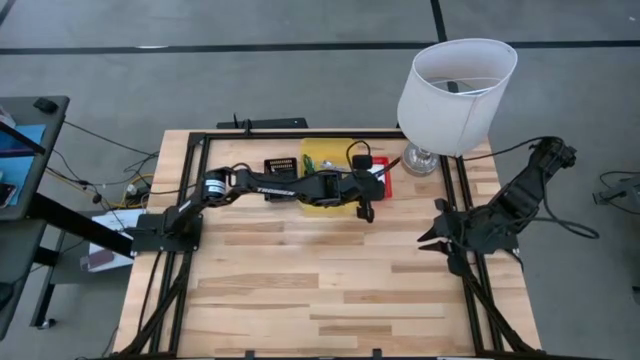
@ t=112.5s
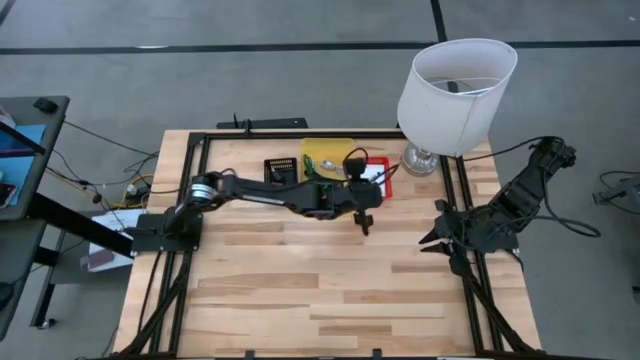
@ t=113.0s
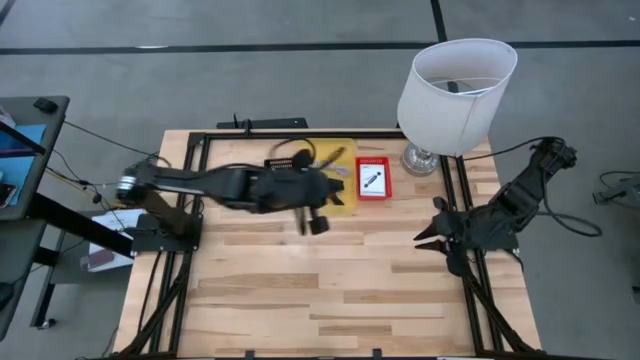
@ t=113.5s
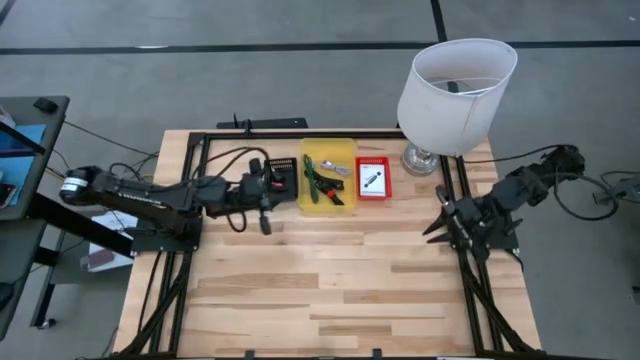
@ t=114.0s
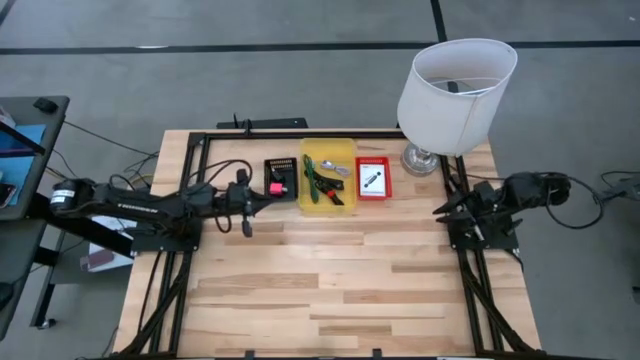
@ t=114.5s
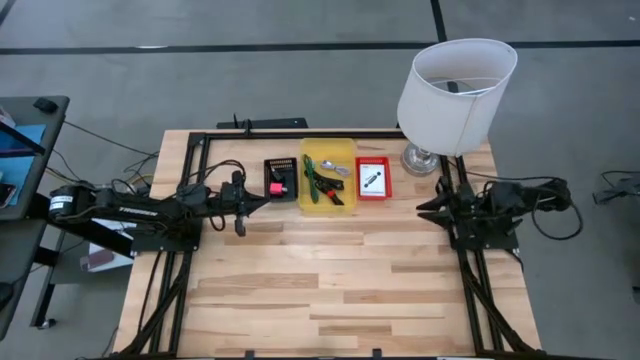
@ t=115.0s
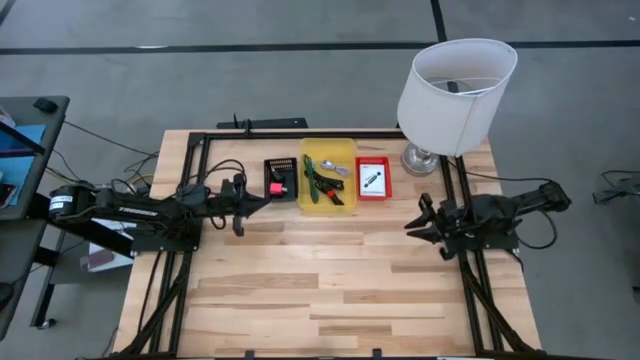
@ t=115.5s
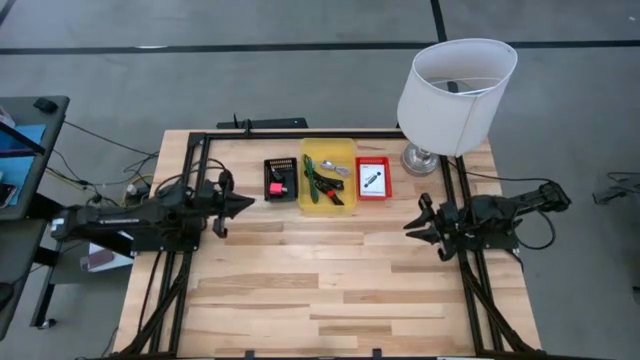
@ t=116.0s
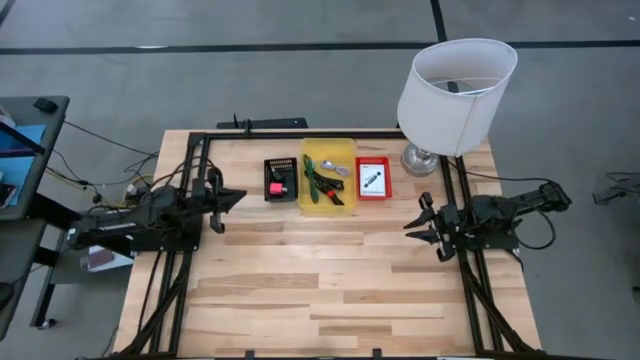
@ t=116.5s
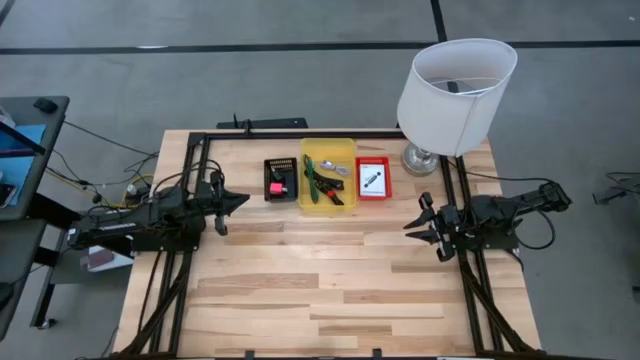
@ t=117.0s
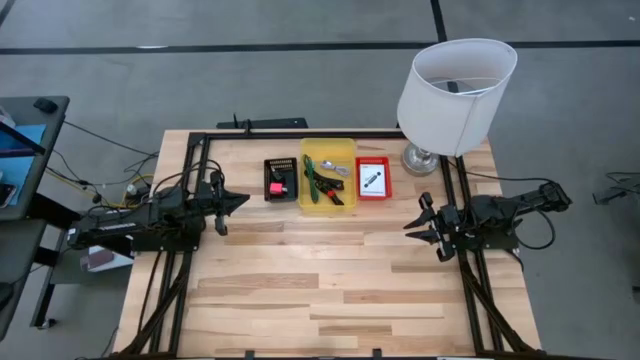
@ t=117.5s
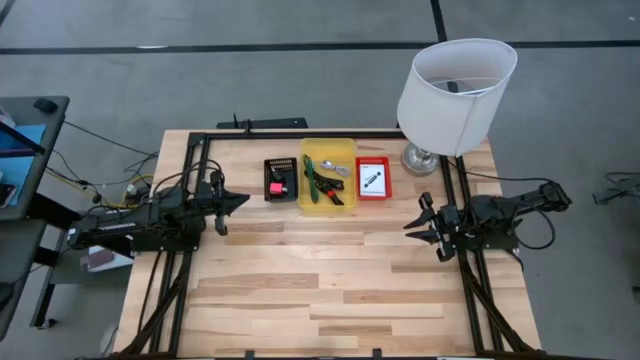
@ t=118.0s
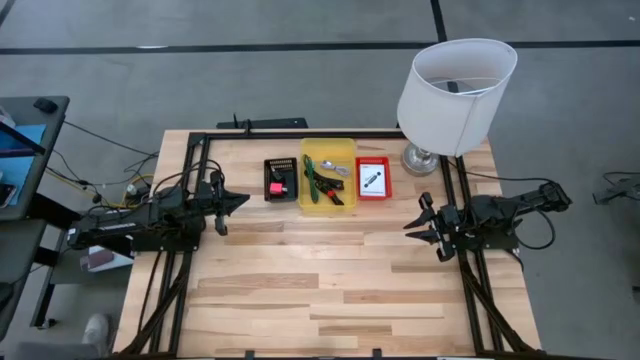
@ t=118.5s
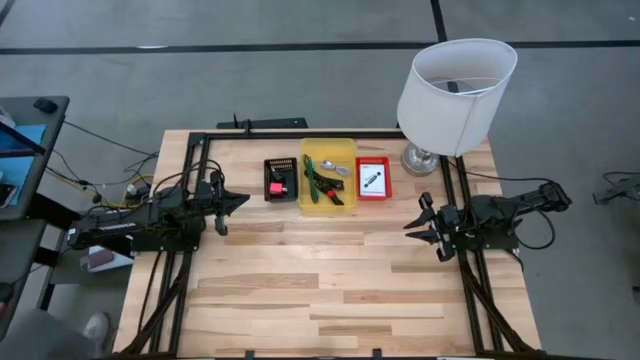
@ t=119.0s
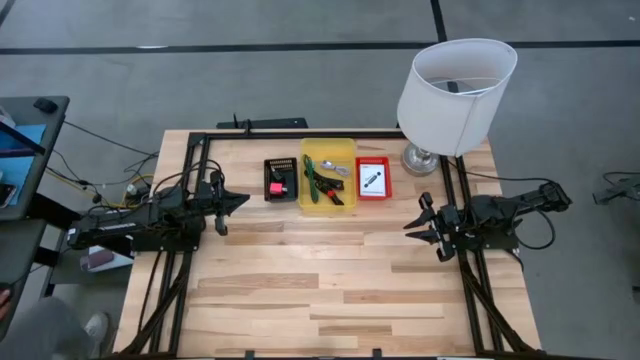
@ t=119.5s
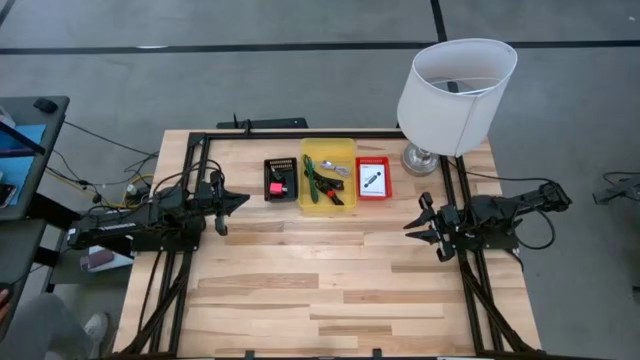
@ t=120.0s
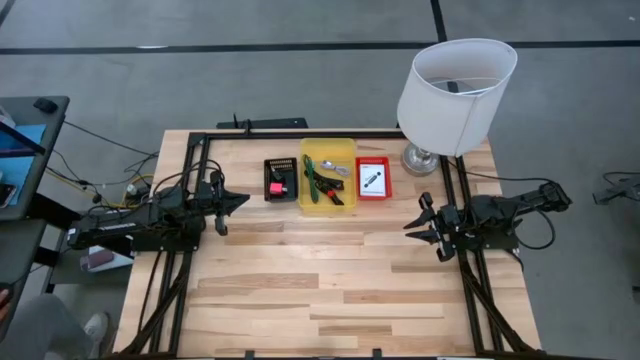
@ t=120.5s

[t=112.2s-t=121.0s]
Task: Pick and place items into bin
Return to Home Position

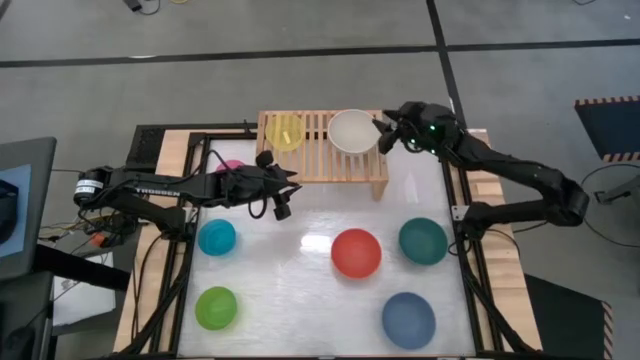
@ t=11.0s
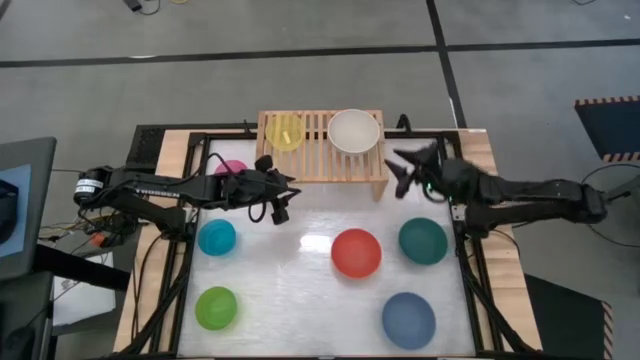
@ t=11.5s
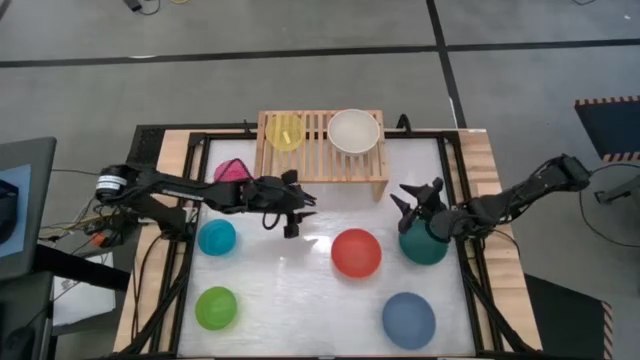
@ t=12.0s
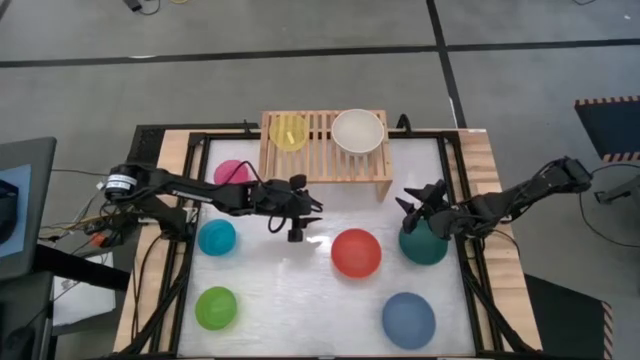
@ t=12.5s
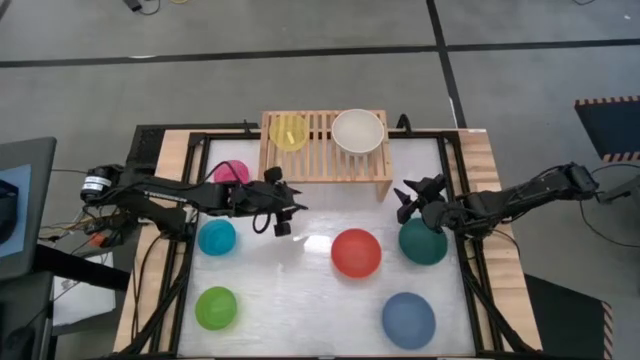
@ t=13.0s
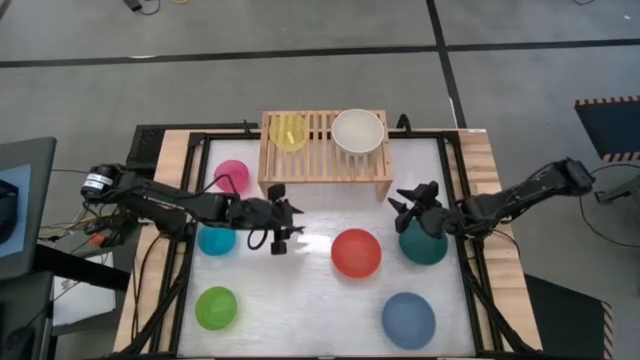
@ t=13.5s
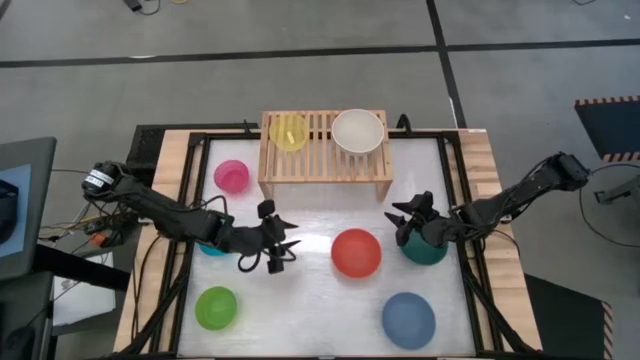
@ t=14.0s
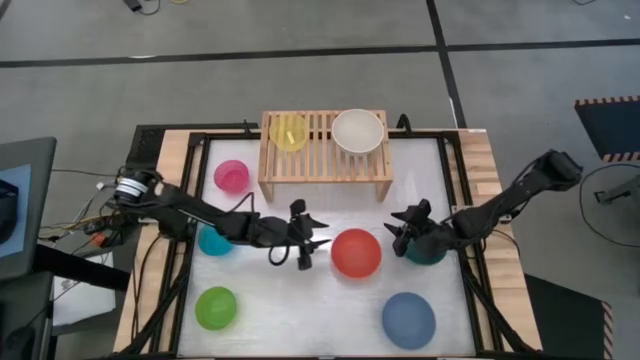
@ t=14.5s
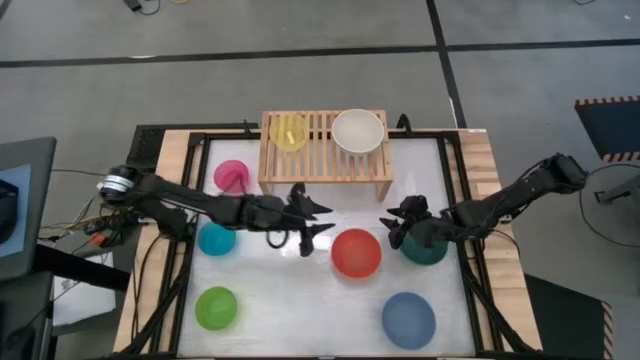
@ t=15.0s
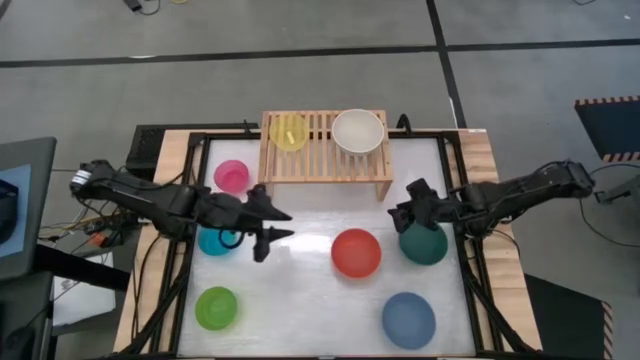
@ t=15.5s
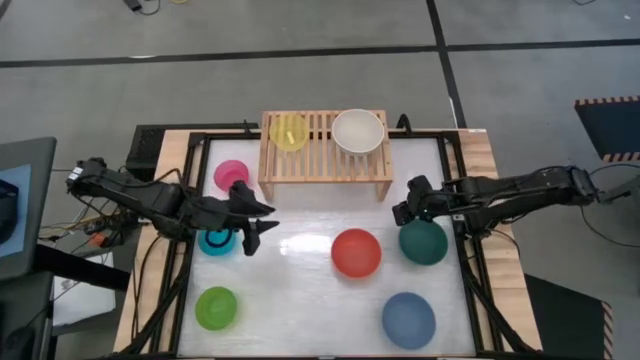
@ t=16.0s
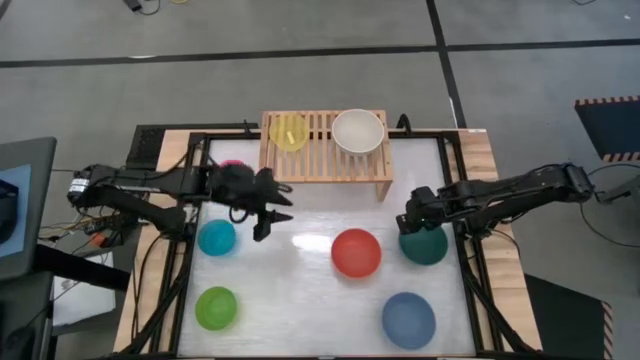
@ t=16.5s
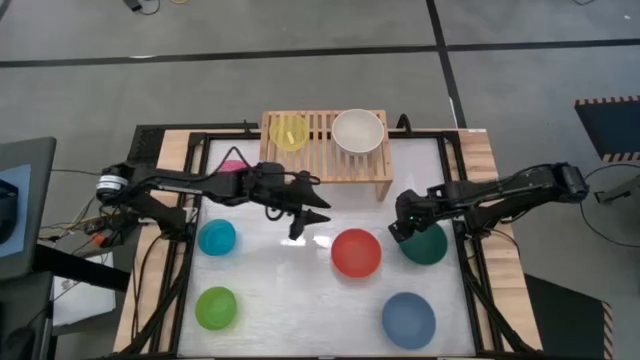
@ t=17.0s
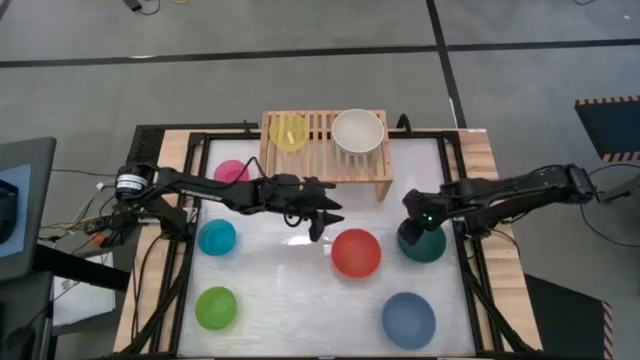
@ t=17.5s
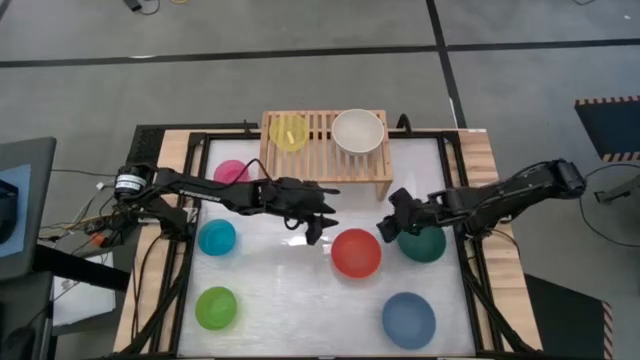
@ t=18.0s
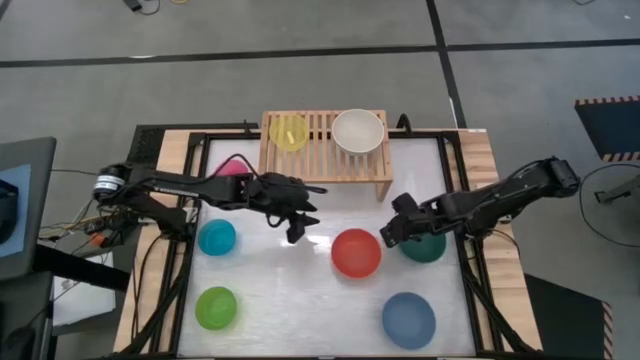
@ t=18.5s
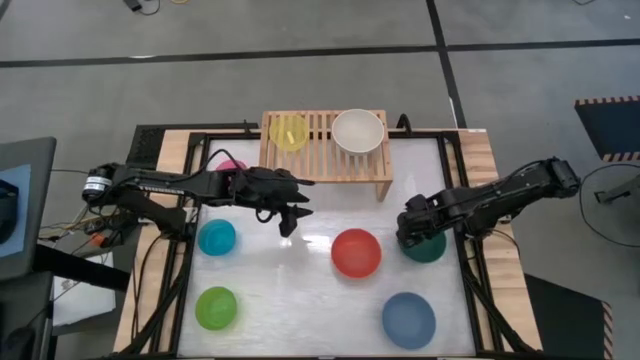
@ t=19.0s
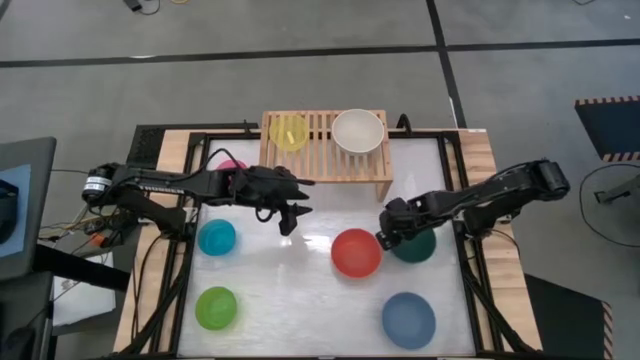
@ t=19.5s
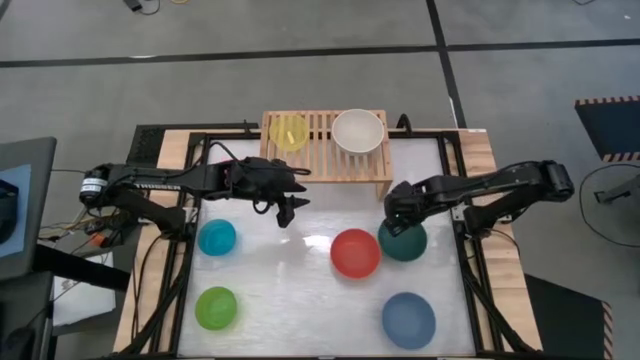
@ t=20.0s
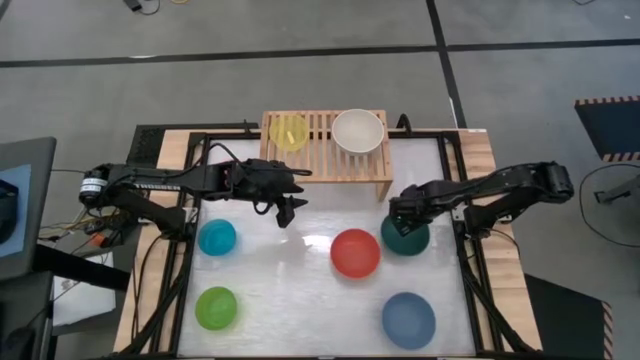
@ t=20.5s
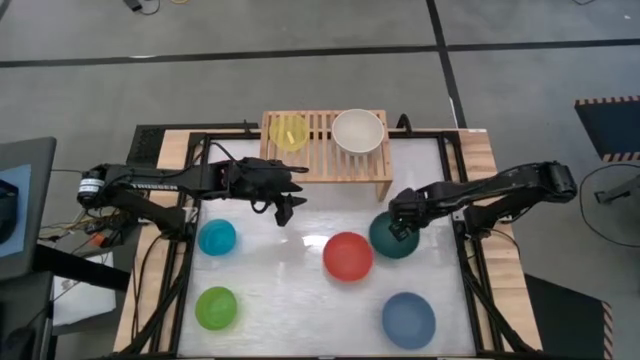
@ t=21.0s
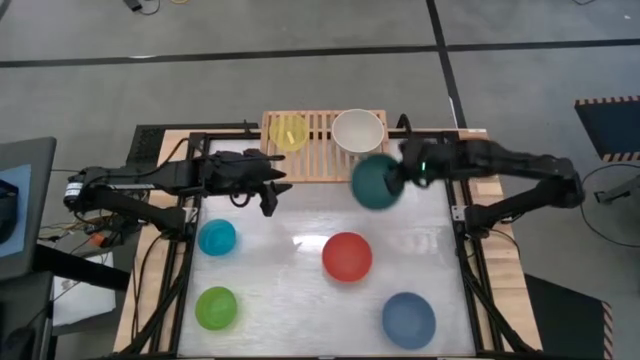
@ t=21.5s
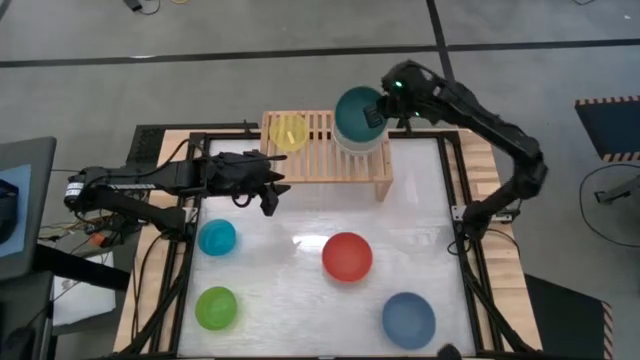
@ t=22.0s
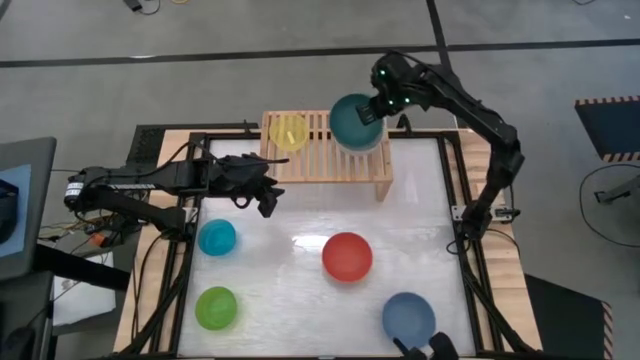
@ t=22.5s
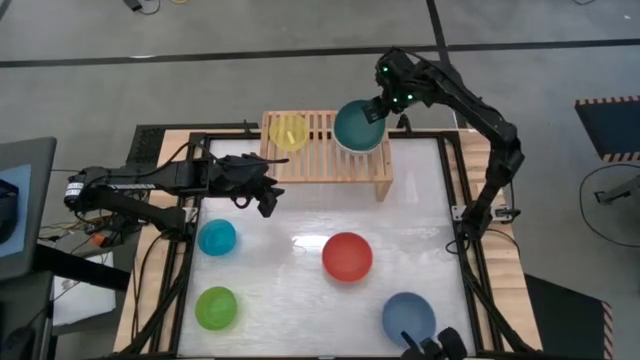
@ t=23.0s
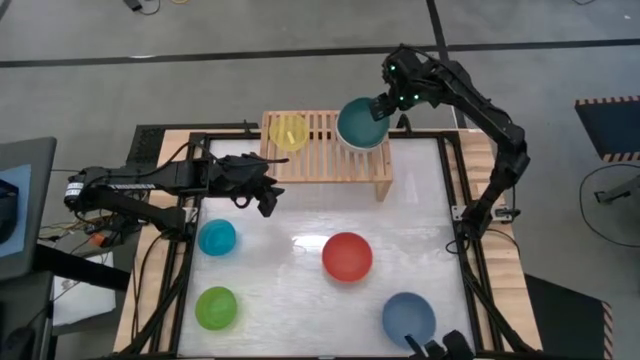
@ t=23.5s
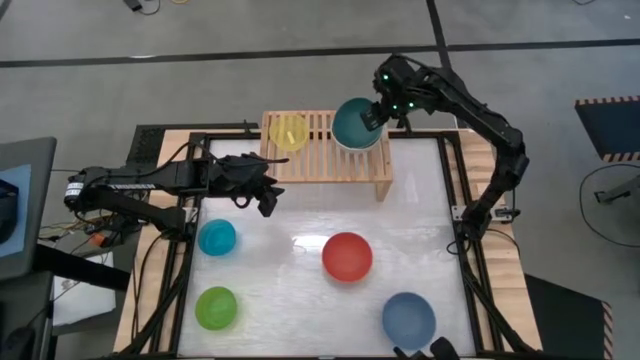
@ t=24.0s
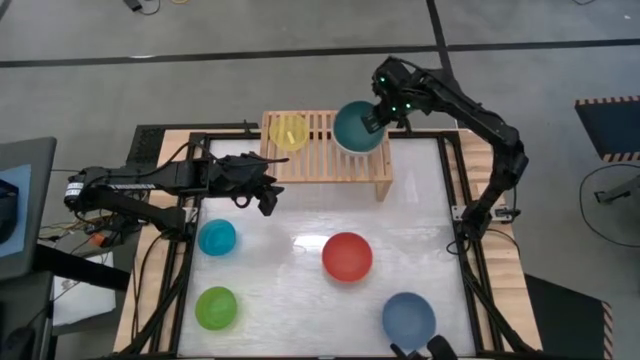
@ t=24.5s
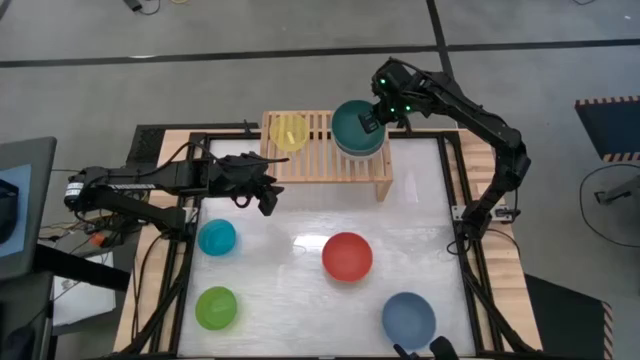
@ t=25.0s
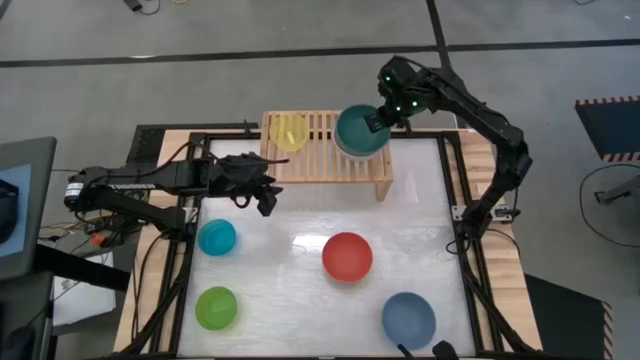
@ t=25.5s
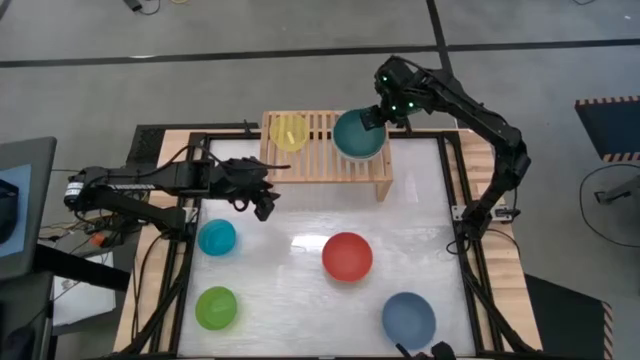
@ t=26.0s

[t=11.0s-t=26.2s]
Task: Place and stack bowls onto a shelf
Stack the green bowl on top of the white bowl on the shelf
